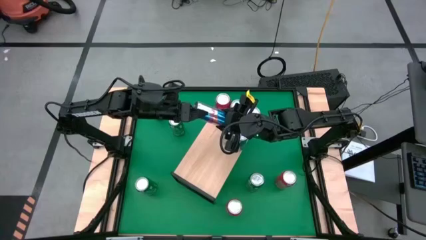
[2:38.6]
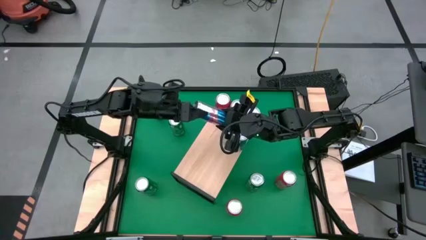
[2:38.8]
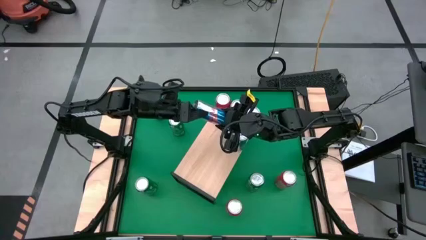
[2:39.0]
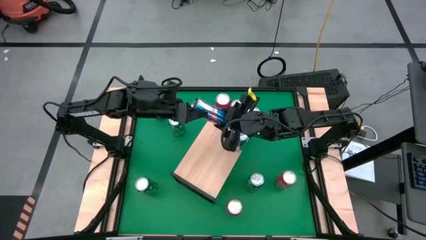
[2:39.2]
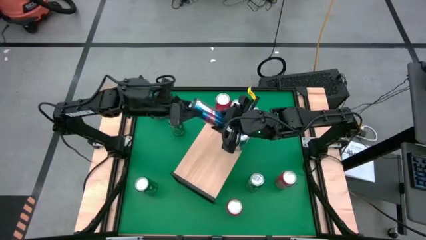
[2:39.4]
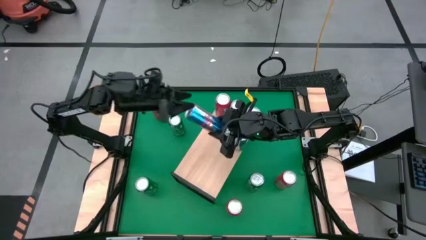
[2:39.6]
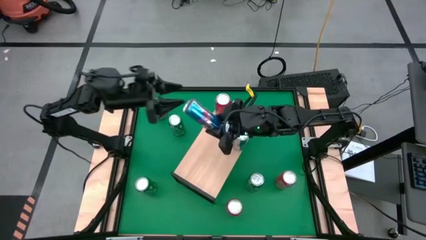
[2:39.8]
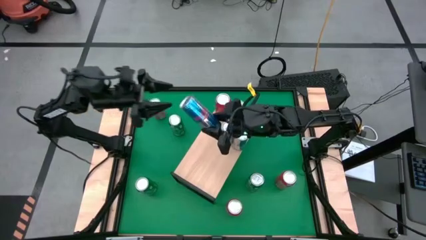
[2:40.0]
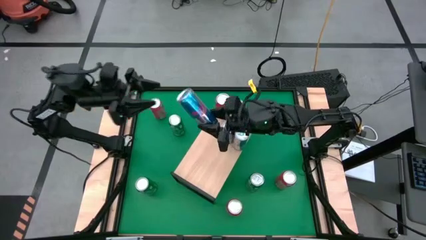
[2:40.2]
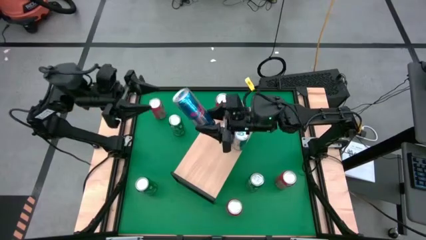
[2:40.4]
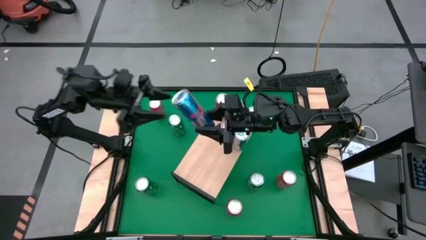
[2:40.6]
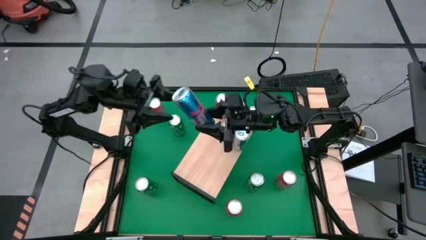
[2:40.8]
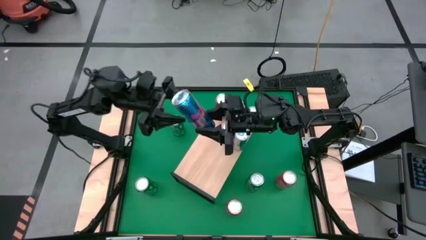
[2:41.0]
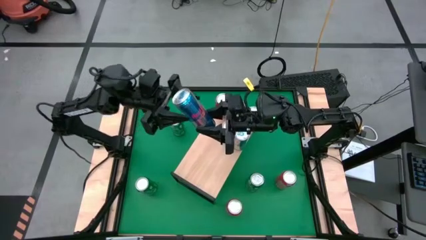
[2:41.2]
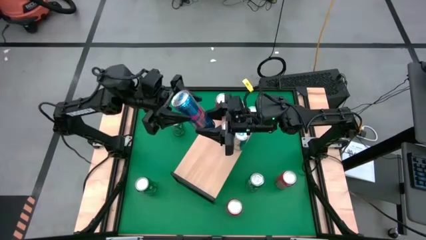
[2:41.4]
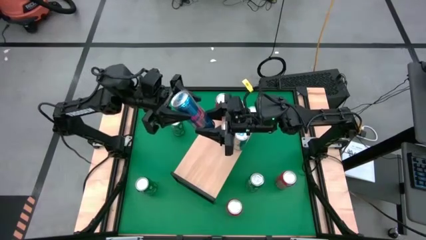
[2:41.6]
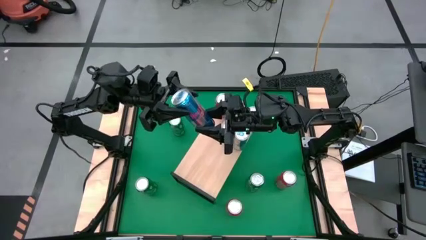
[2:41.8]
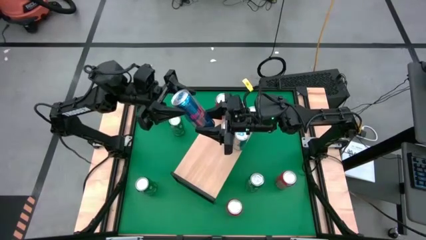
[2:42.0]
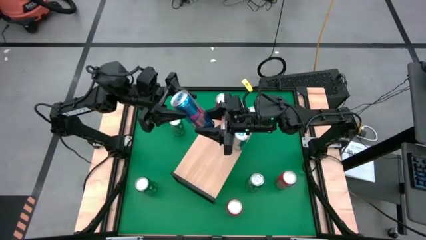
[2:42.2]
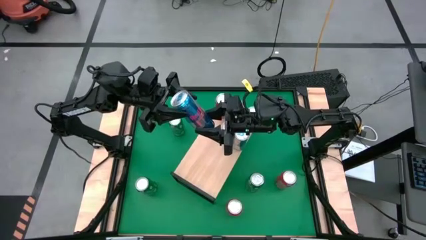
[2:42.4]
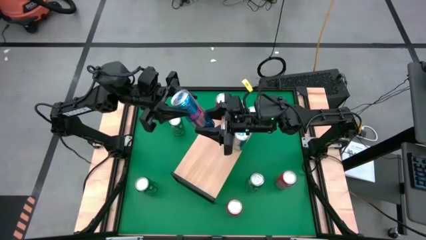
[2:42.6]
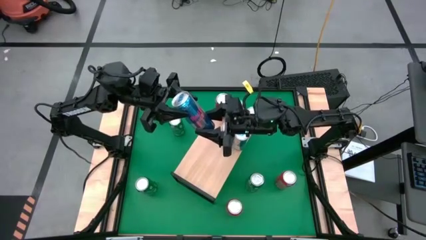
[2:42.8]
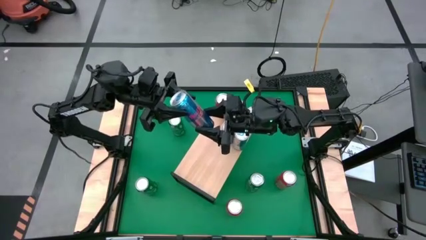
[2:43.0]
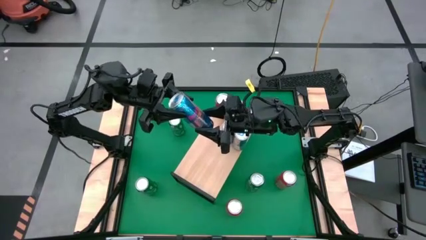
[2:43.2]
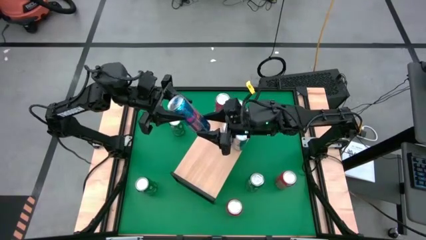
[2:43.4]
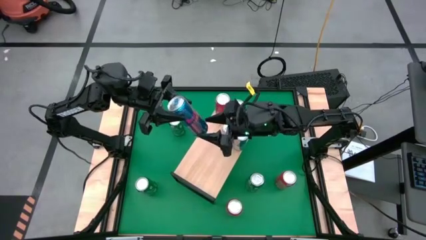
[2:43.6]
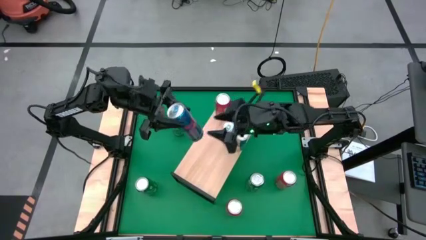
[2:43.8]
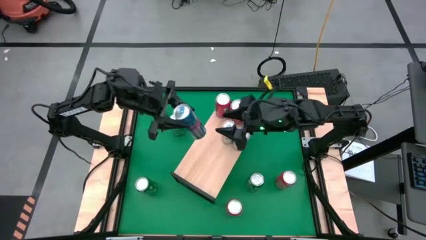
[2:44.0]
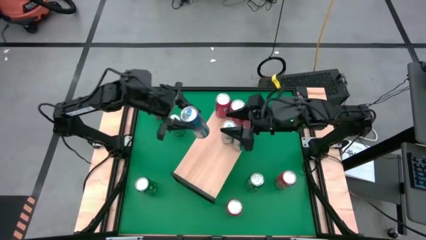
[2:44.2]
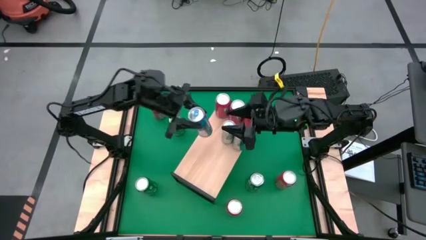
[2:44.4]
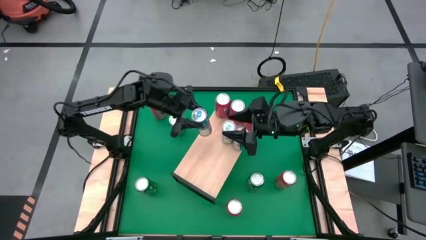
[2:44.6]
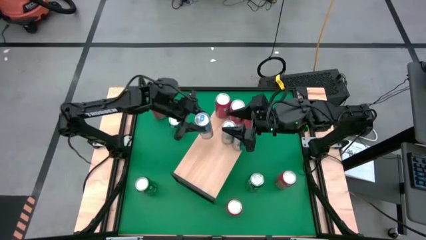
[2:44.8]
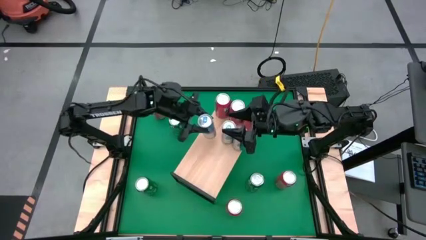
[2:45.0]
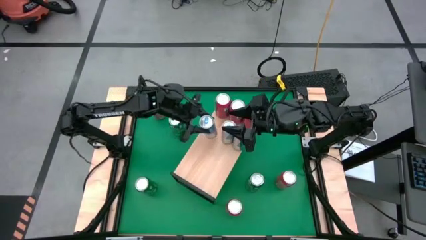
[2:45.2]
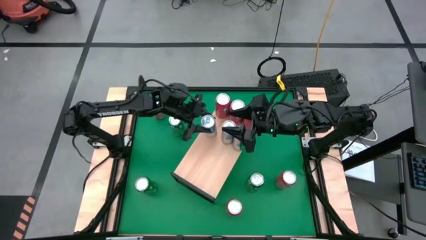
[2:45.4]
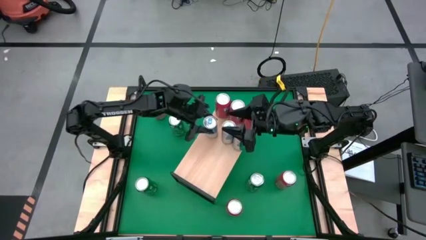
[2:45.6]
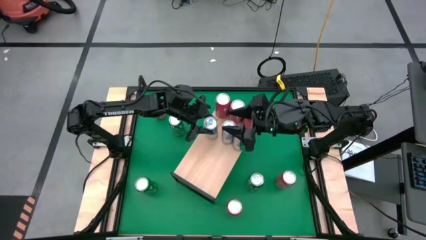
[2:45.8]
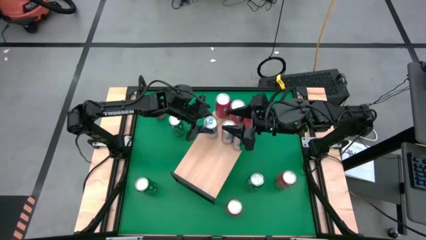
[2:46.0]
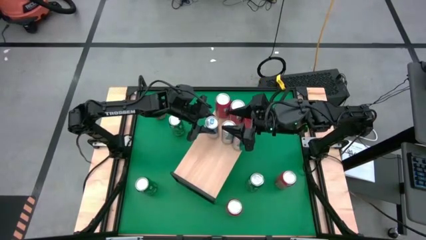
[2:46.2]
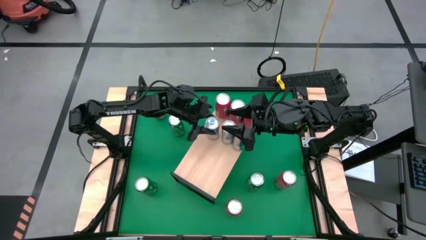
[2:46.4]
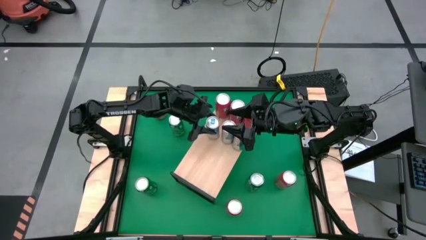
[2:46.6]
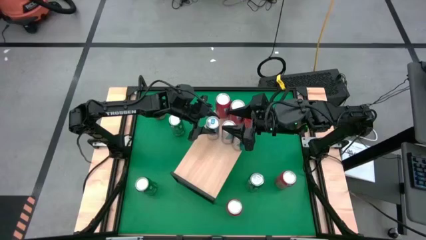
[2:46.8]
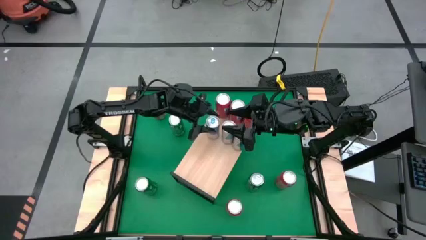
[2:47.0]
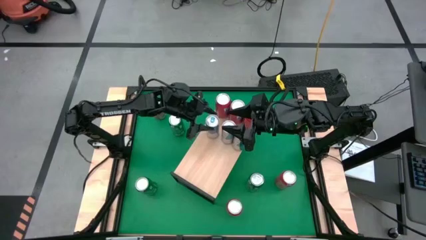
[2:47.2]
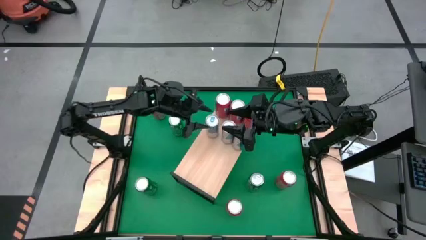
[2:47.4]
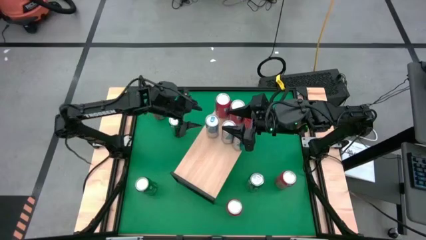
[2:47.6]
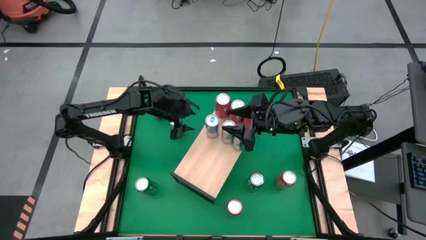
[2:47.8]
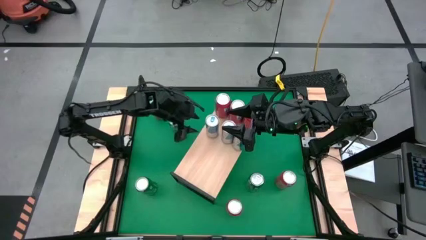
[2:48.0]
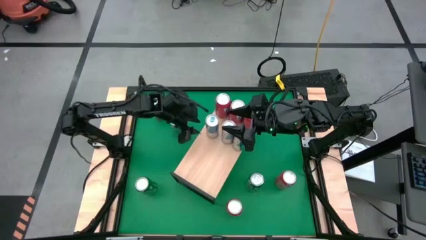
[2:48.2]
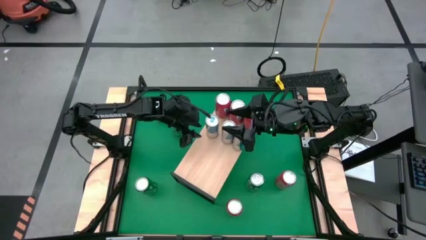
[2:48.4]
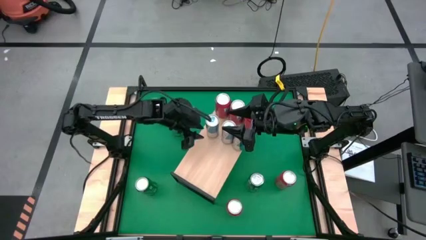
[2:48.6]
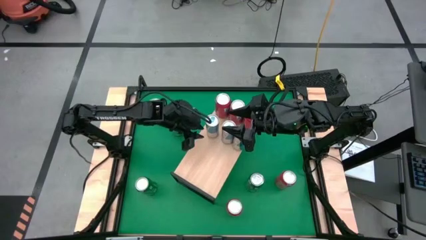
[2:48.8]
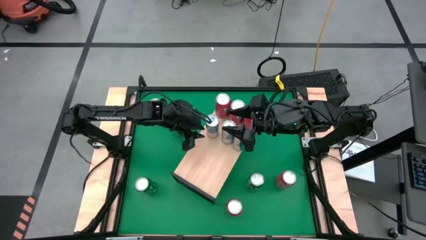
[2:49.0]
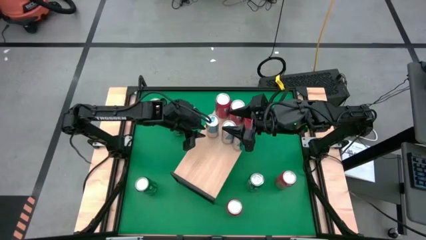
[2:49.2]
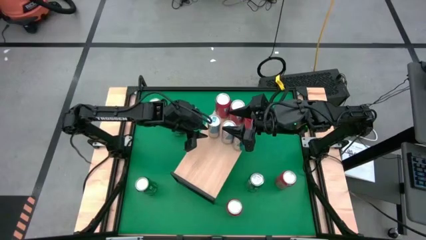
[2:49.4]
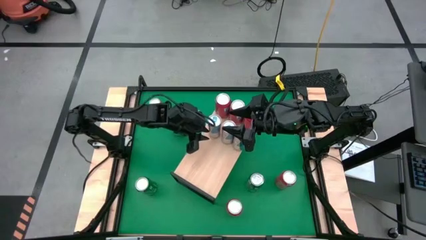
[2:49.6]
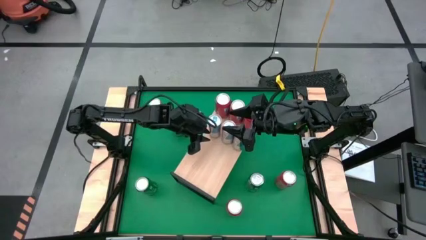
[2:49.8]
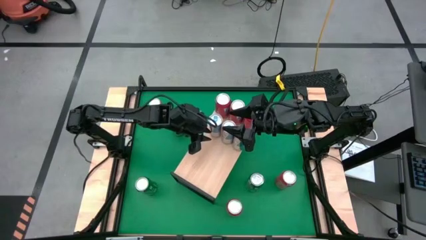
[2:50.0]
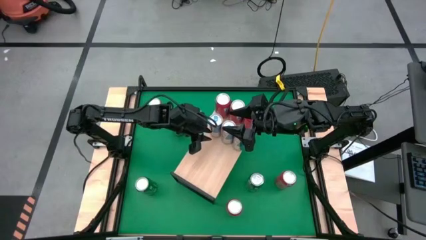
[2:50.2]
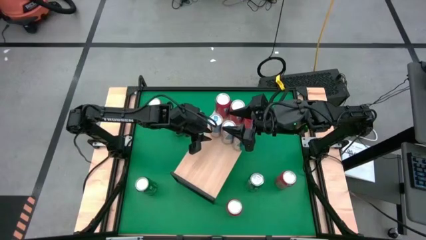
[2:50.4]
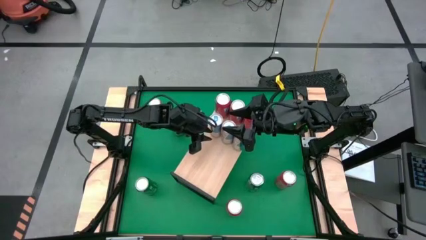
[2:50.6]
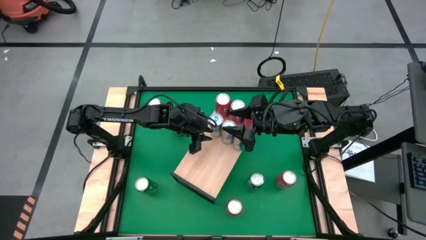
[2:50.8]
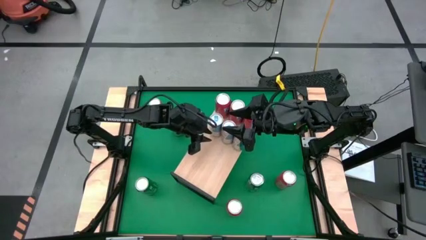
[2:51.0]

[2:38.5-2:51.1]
Task: Sort soda cans
Put the blue soda can on the shelf and align it with the other blue soda cans

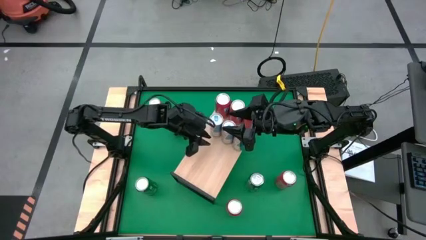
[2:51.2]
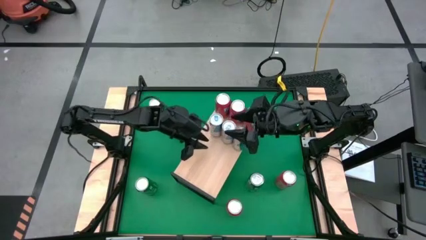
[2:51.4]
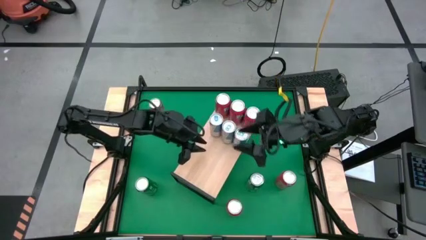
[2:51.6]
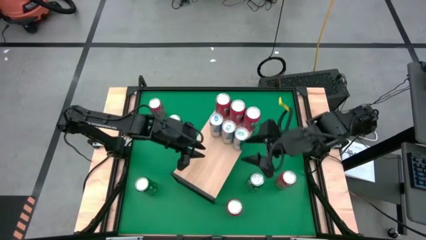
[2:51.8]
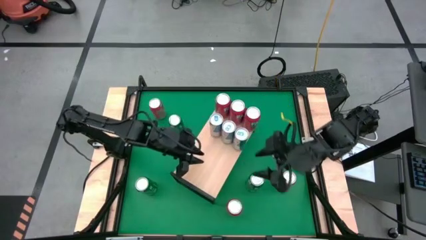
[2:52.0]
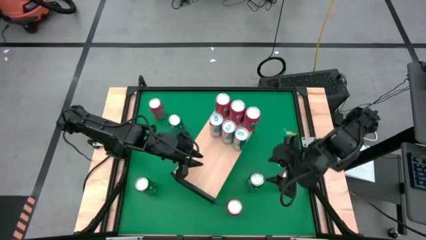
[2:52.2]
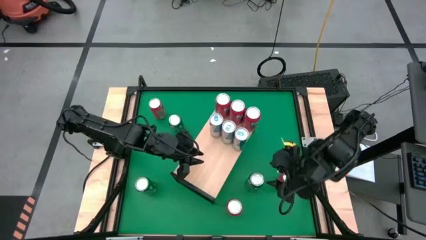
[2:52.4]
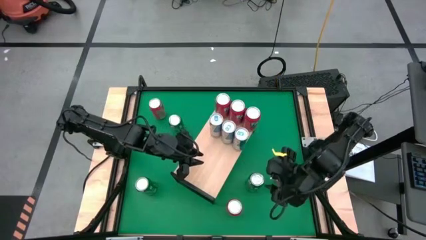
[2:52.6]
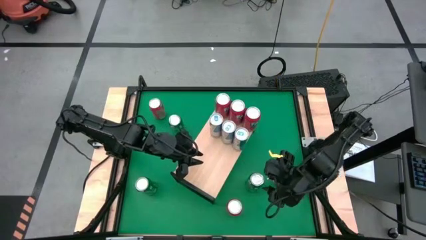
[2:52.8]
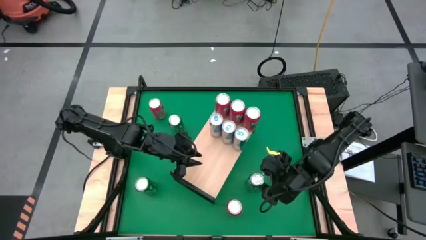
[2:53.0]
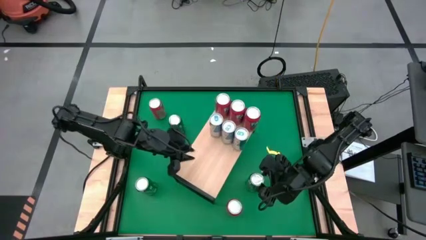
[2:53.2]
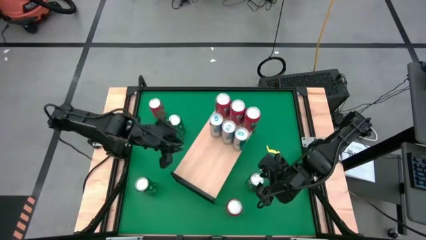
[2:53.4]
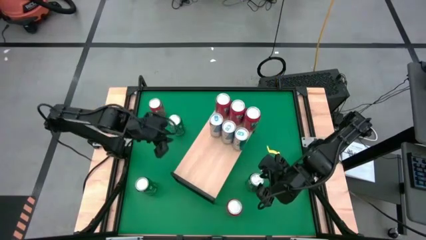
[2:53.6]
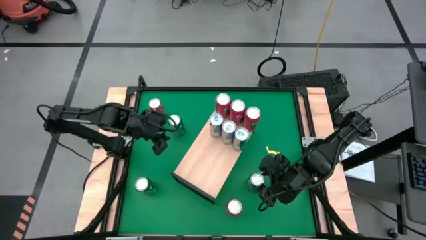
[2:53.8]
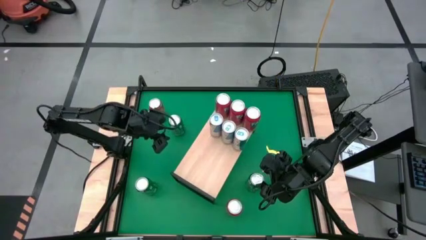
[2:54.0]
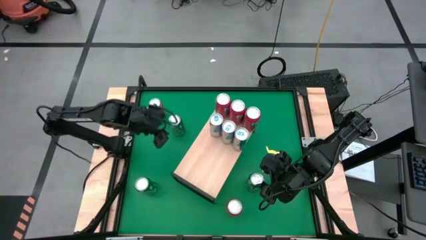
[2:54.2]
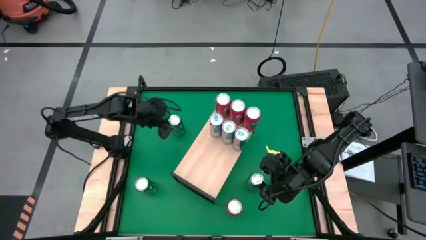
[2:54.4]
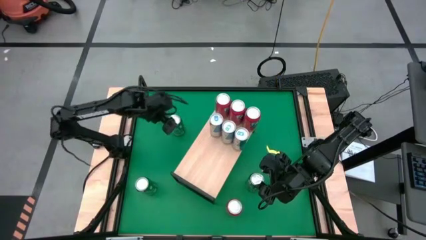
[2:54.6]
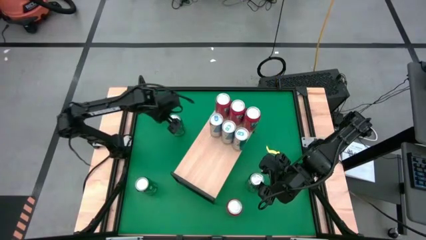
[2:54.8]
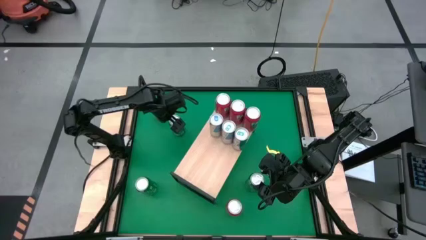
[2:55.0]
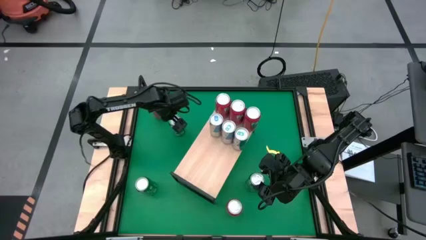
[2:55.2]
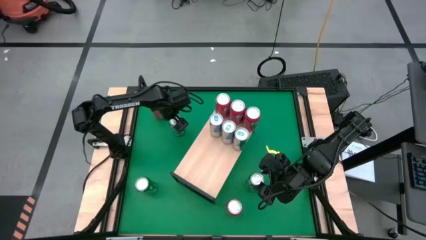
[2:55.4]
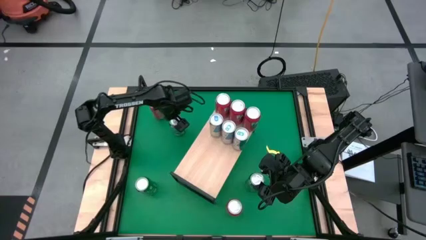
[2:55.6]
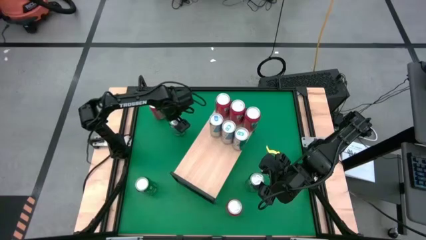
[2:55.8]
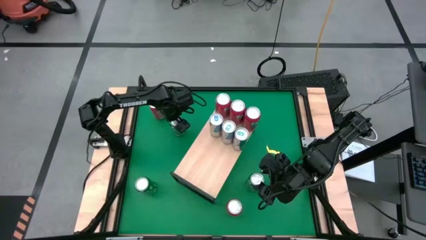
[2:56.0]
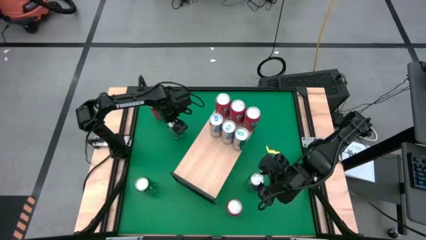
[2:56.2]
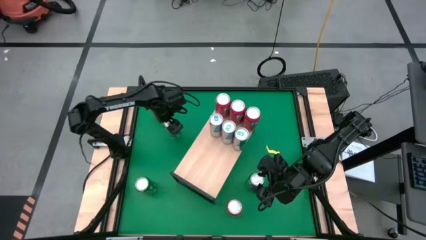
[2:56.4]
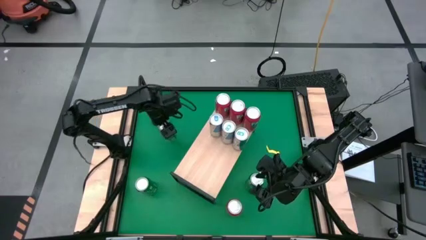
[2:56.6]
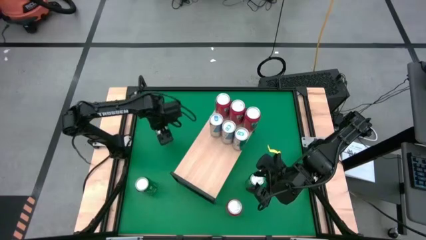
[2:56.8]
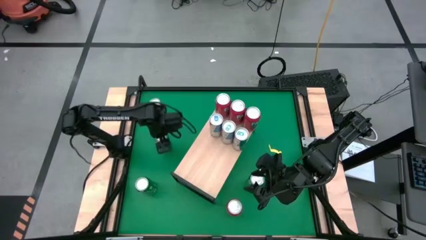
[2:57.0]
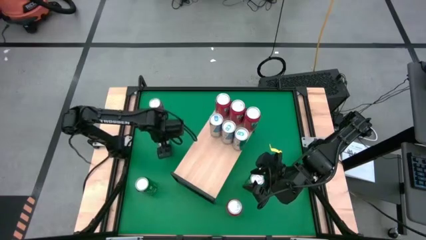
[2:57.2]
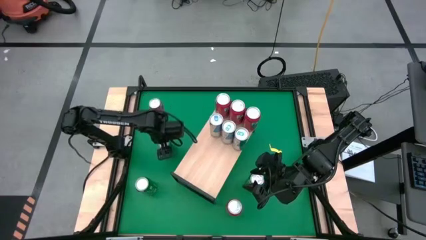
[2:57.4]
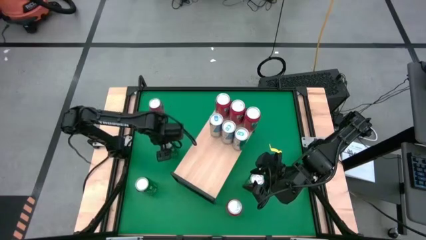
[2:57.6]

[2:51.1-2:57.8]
Move the green soda can to the middle left of the table
